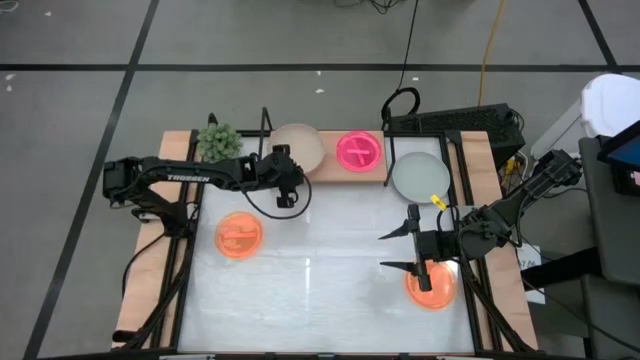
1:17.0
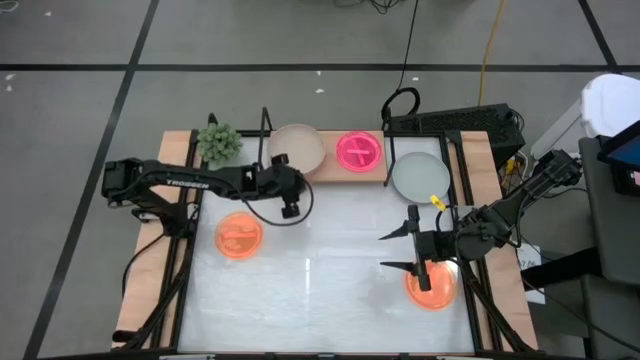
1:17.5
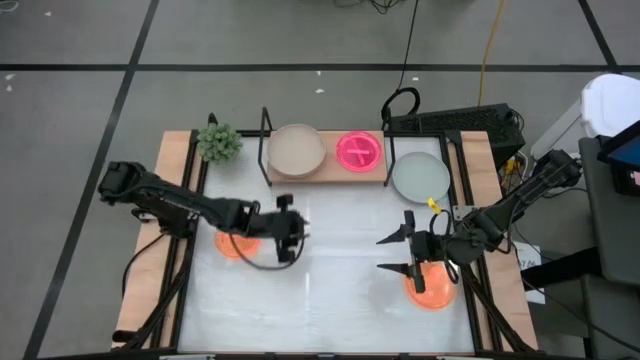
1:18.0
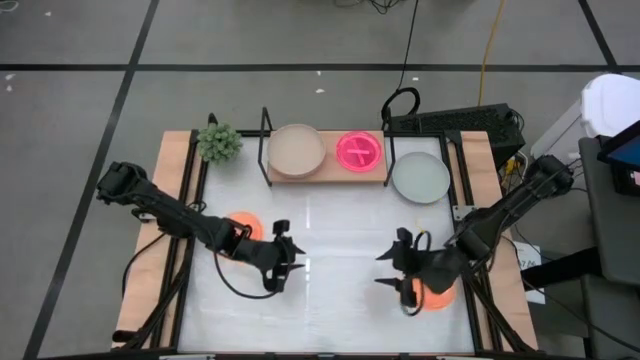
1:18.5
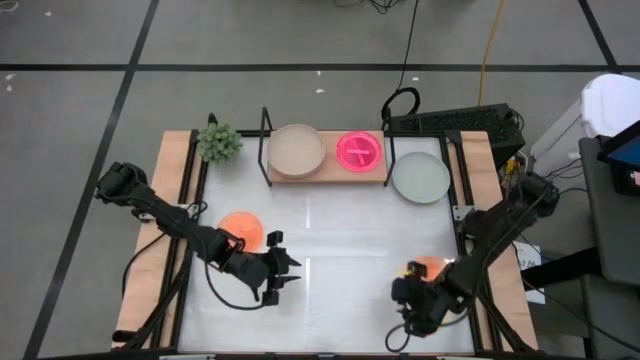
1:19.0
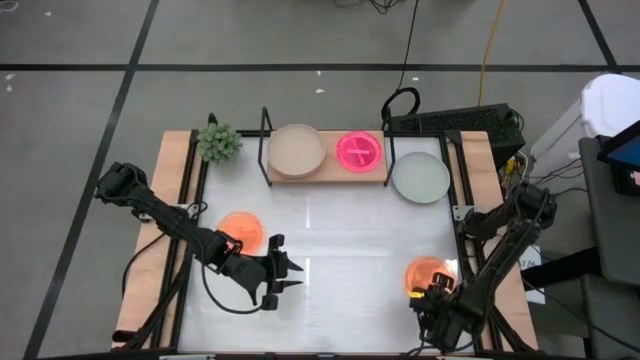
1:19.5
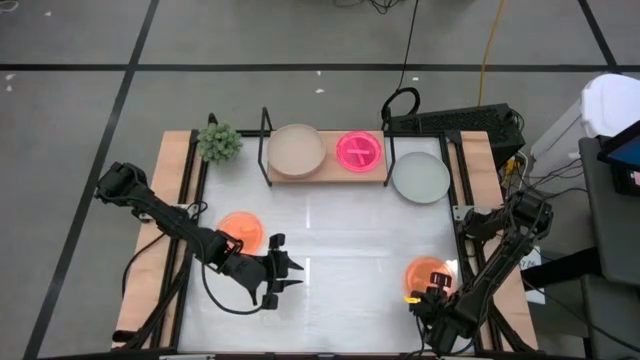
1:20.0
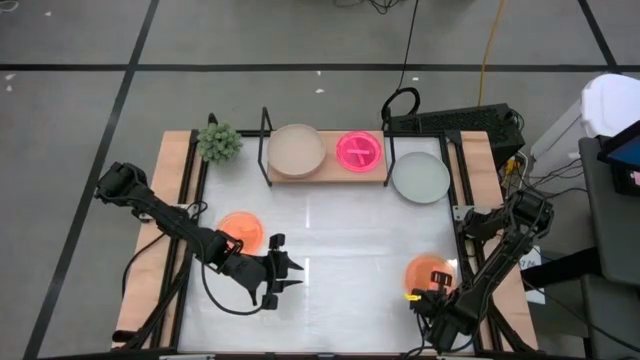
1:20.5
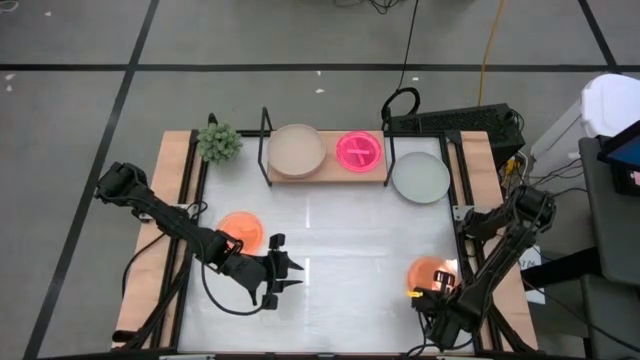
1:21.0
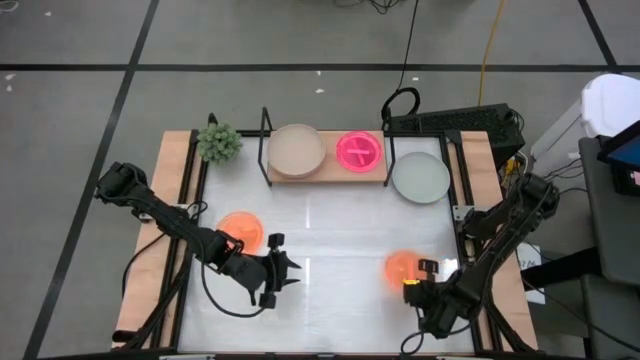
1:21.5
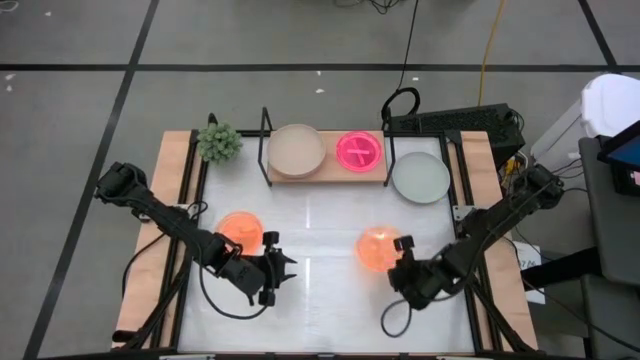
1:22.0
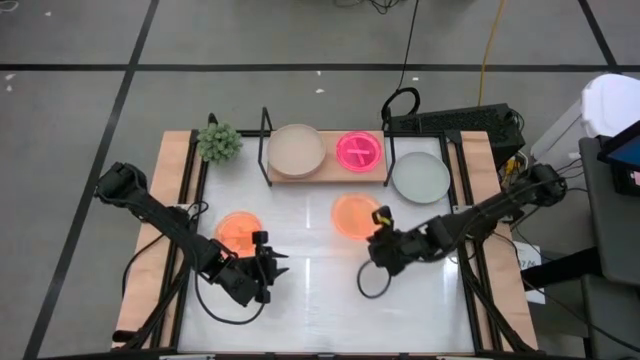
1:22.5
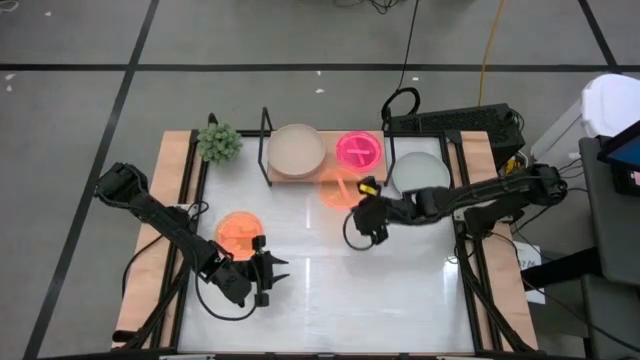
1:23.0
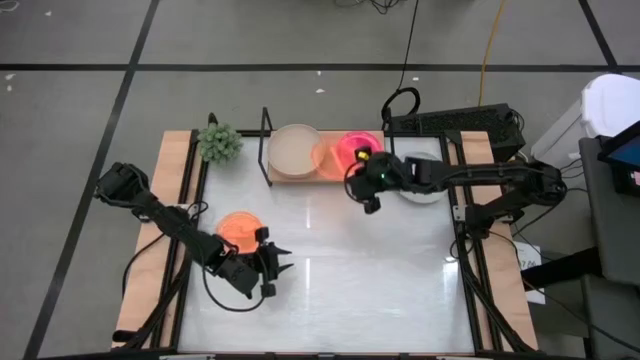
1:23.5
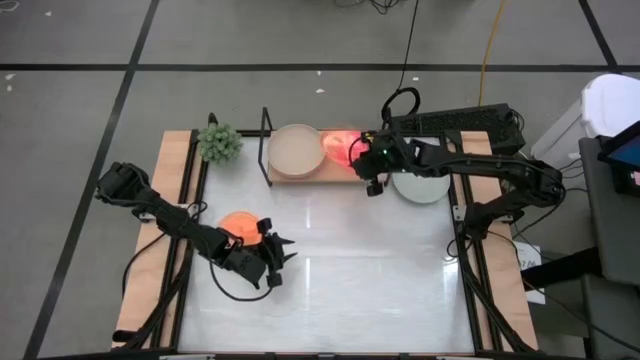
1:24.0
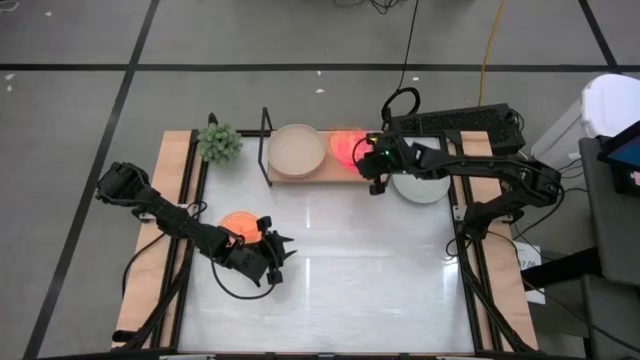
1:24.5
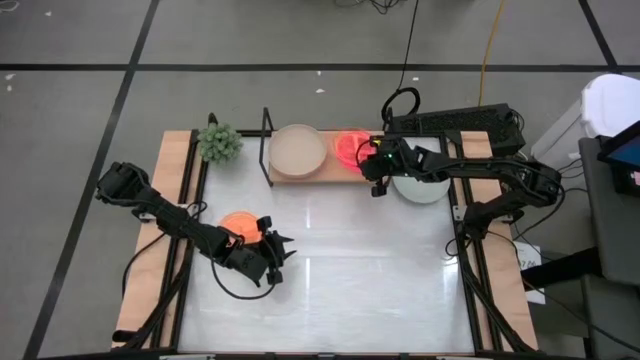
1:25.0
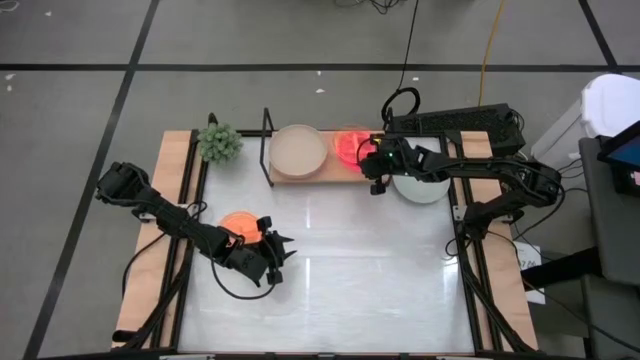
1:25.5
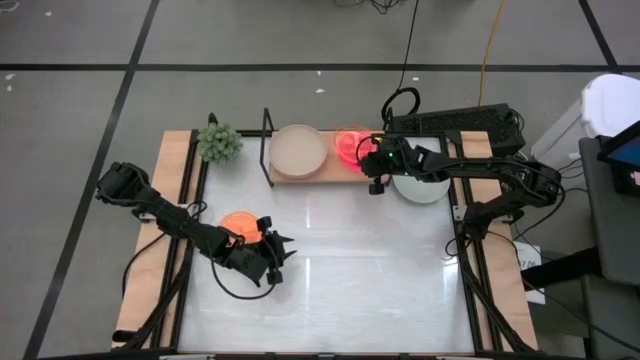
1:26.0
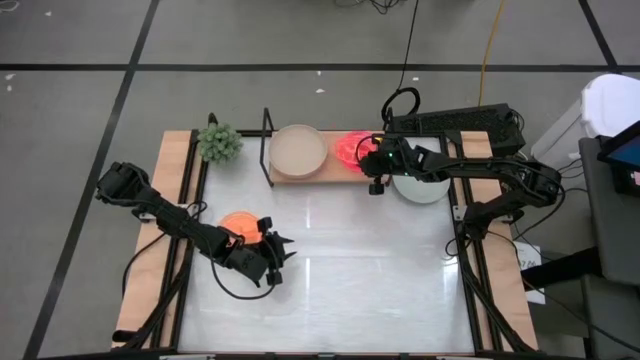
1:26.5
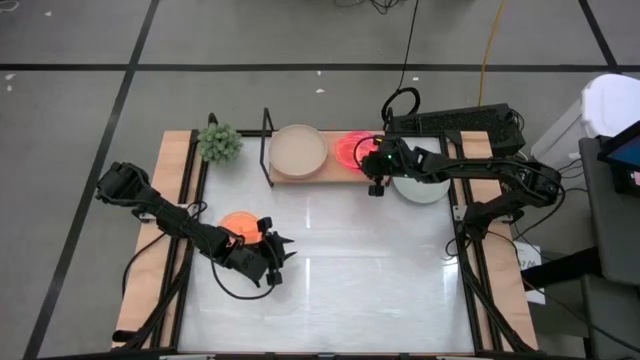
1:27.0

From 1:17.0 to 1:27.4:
Task: Place and stack plates onto a shelf
Stack the right orange plate on the pink plate on the shelf

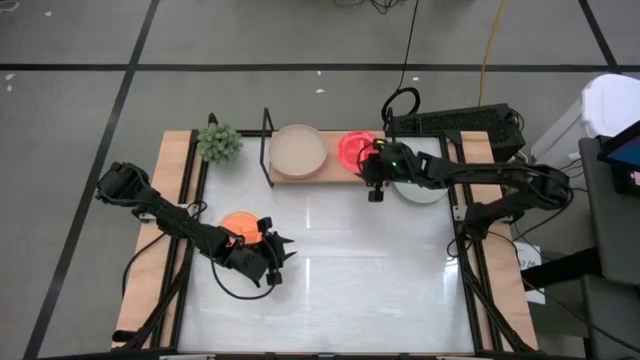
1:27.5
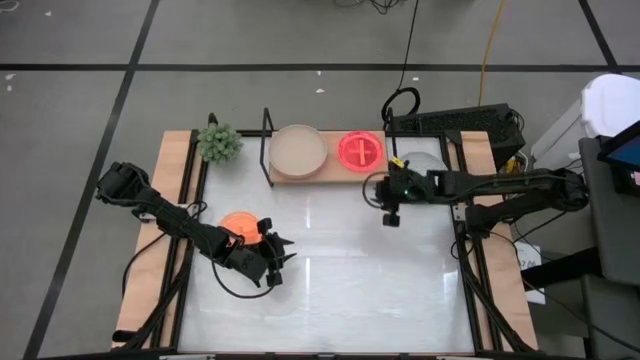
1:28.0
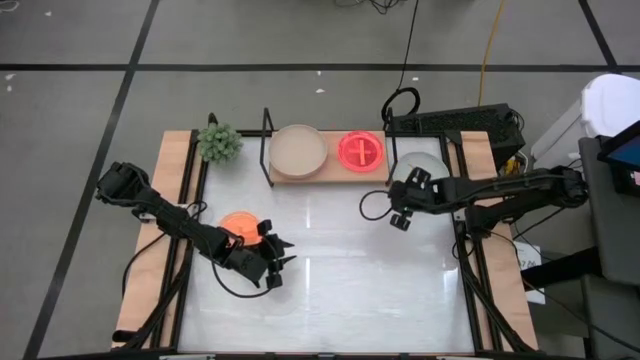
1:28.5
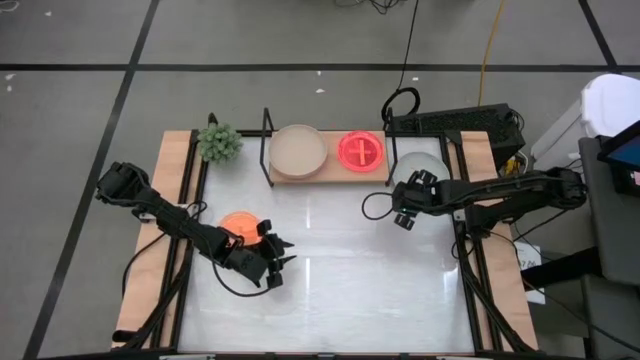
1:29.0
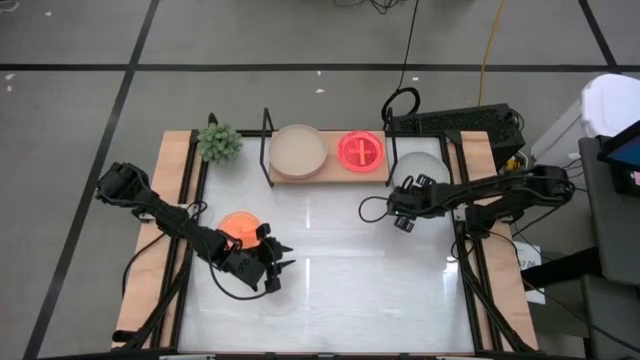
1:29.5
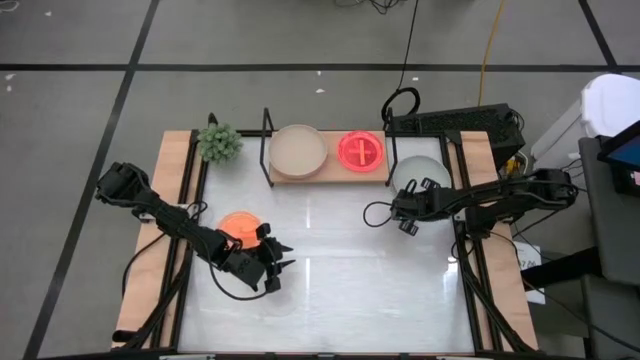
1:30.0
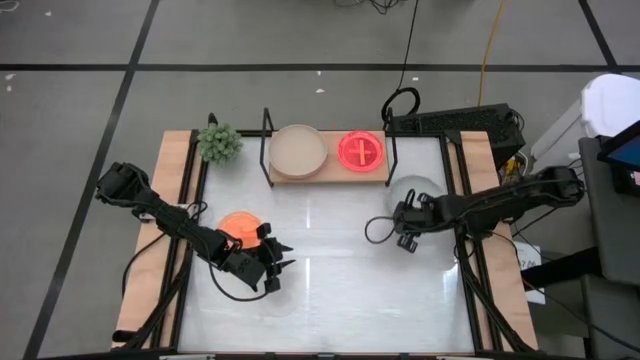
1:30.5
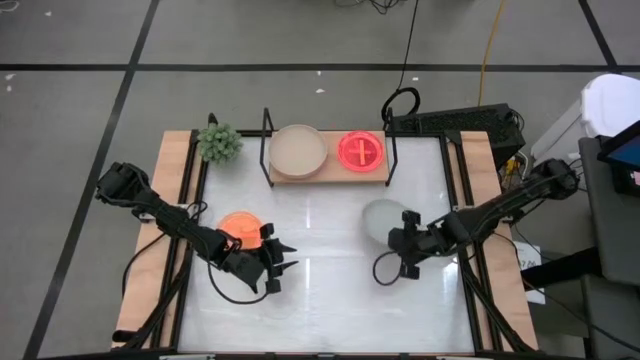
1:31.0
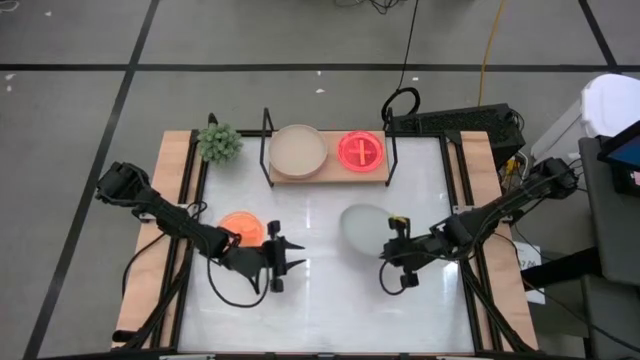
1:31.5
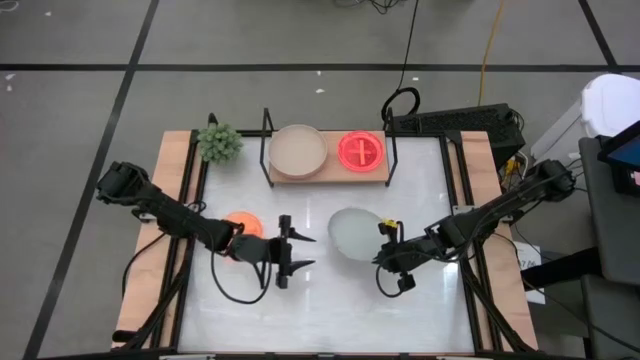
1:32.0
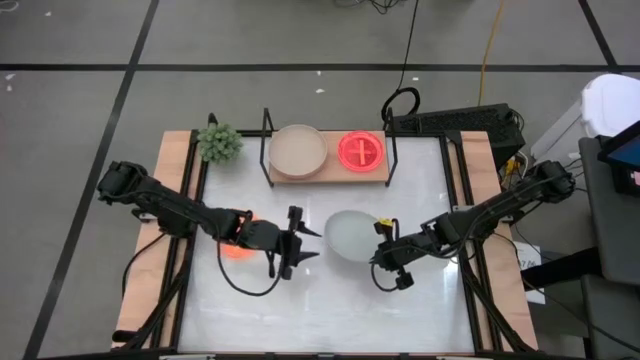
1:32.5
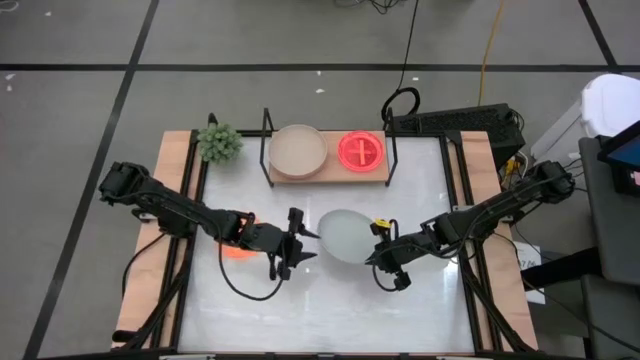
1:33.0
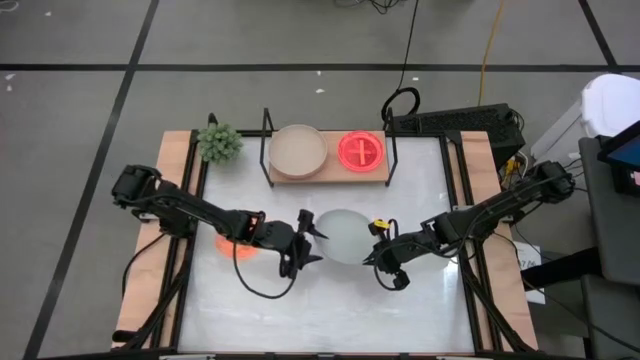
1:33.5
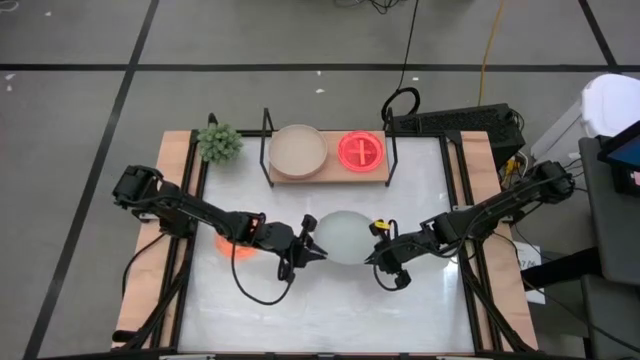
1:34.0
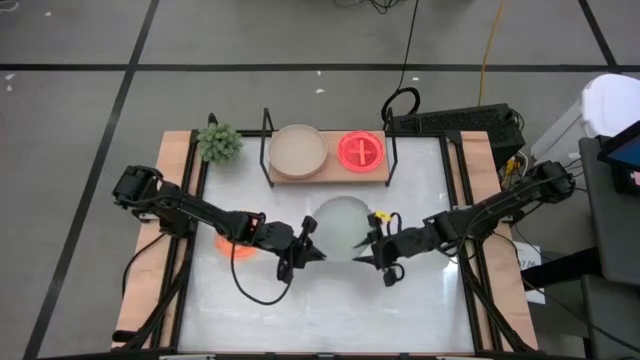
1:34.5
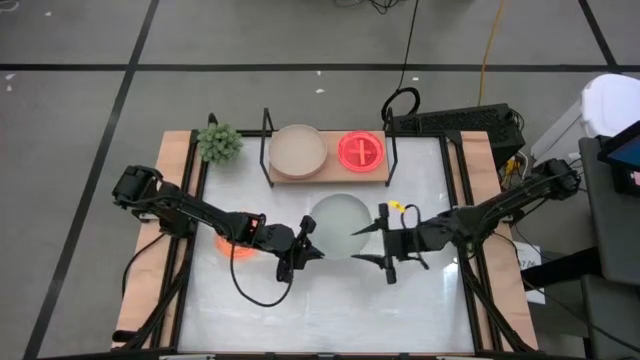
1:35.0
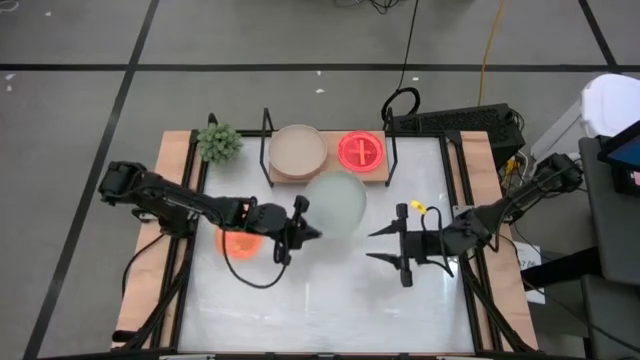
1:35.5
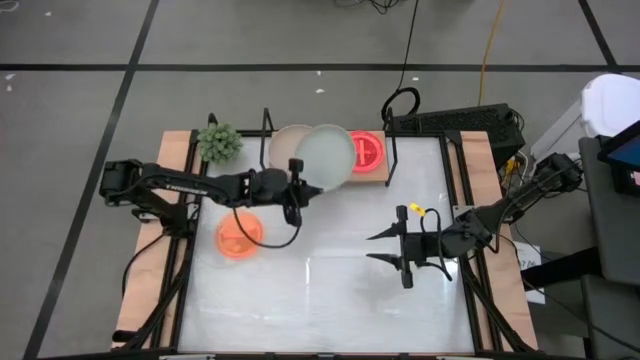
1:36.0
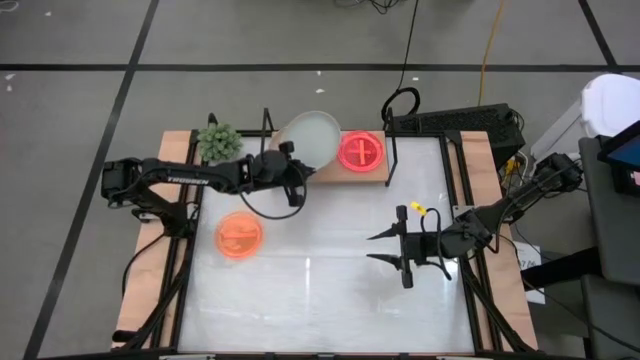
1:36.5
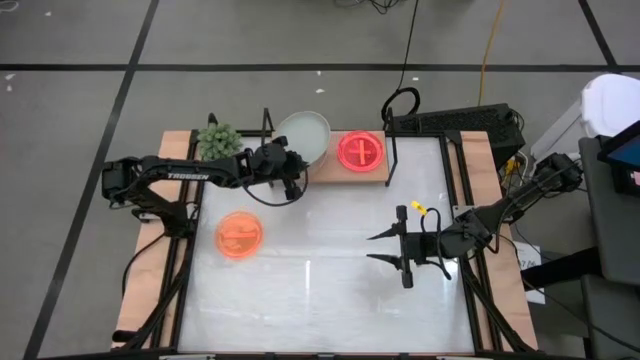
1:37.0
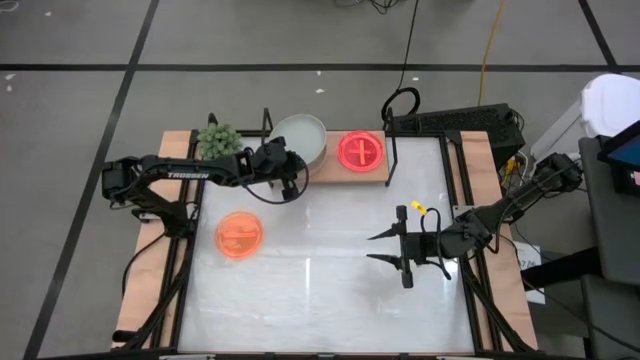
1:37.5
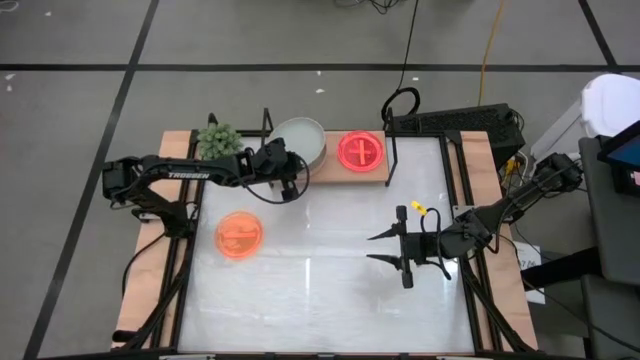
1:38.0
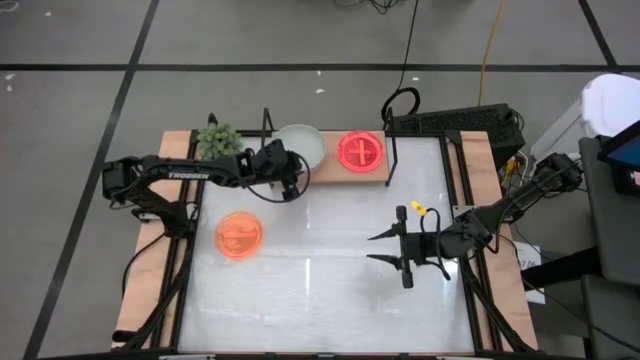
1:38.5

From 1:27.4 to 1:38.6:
Stack the gray plate on the light brown plate on the shelf
